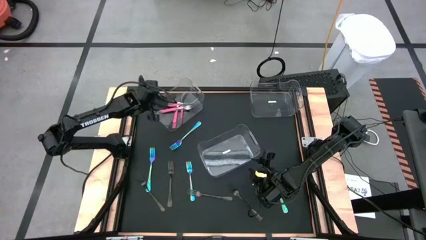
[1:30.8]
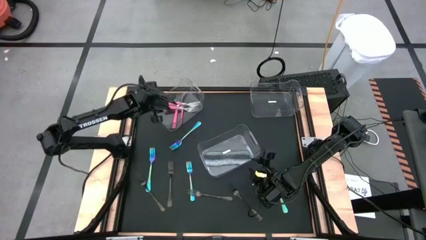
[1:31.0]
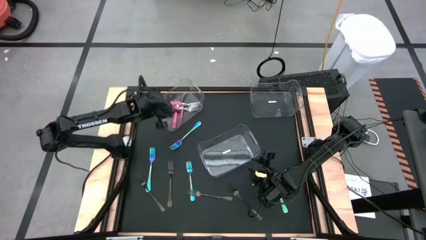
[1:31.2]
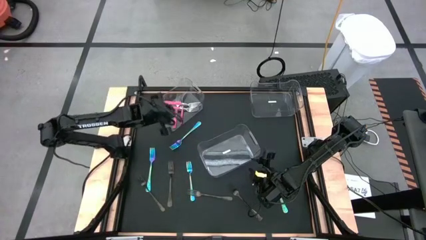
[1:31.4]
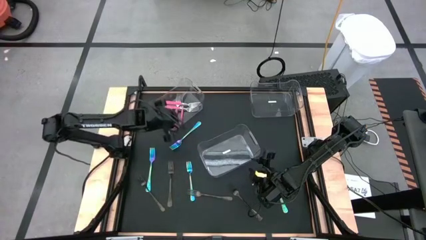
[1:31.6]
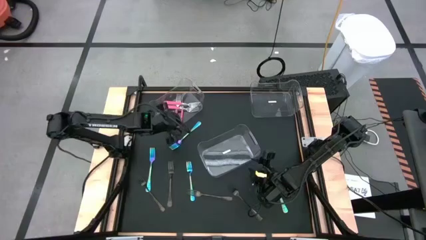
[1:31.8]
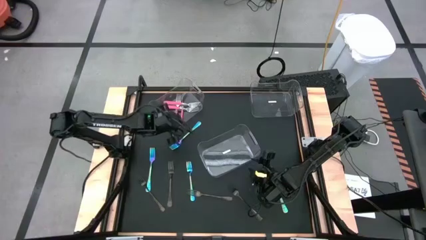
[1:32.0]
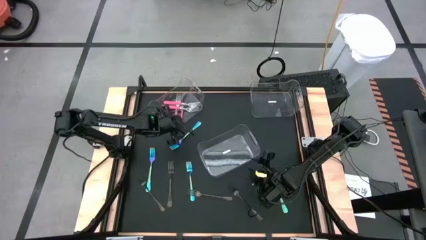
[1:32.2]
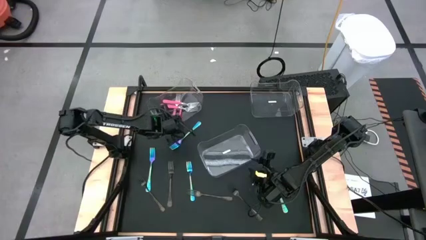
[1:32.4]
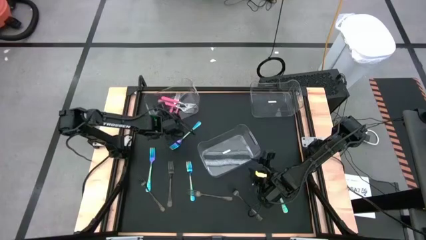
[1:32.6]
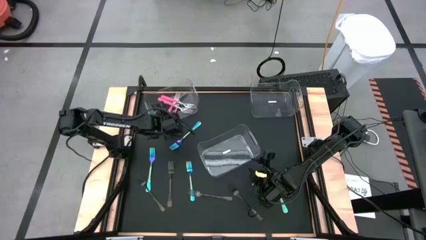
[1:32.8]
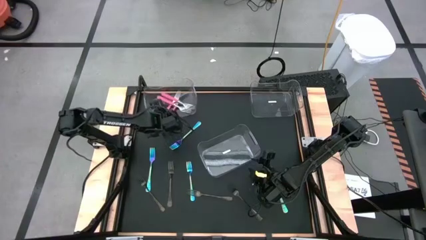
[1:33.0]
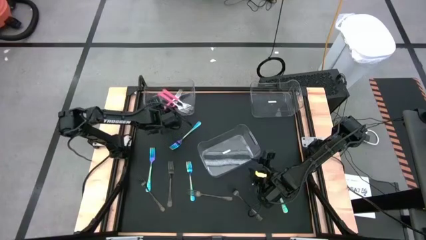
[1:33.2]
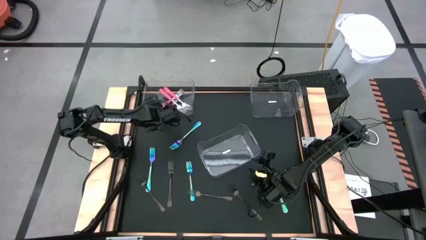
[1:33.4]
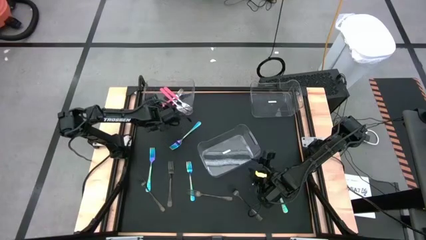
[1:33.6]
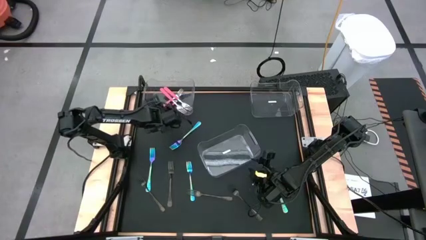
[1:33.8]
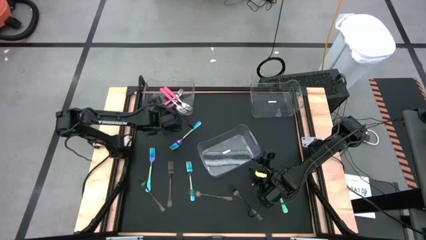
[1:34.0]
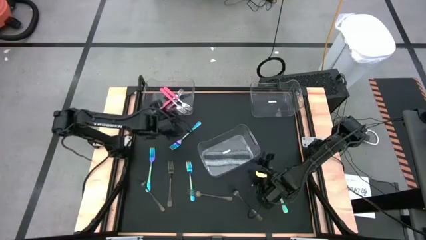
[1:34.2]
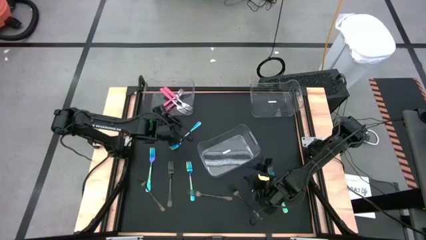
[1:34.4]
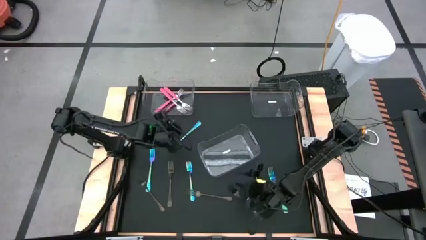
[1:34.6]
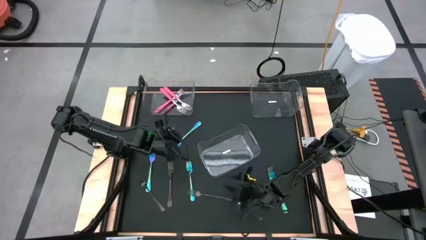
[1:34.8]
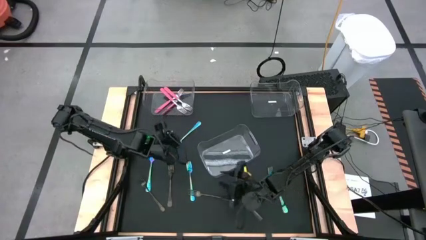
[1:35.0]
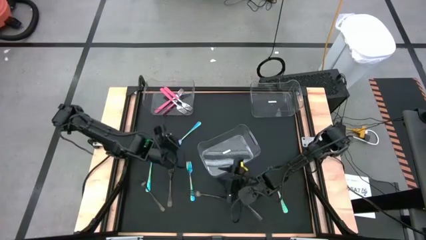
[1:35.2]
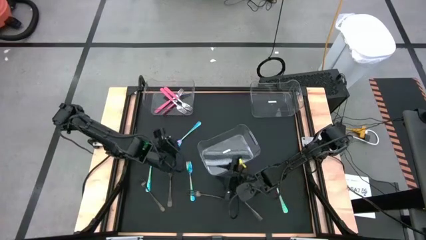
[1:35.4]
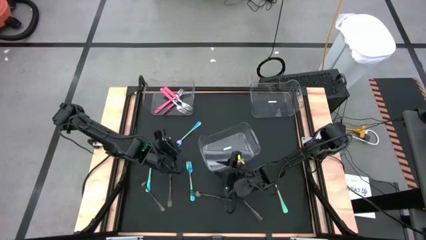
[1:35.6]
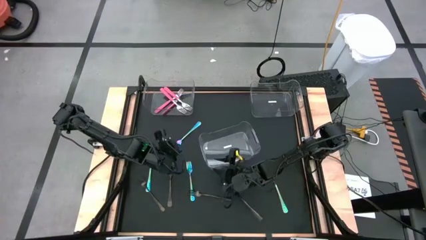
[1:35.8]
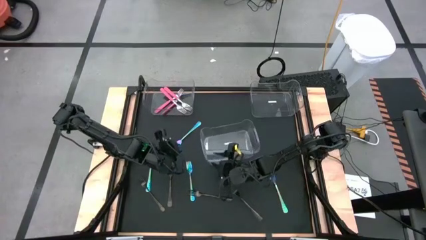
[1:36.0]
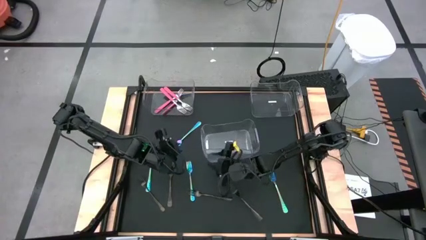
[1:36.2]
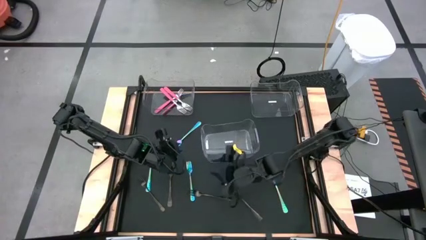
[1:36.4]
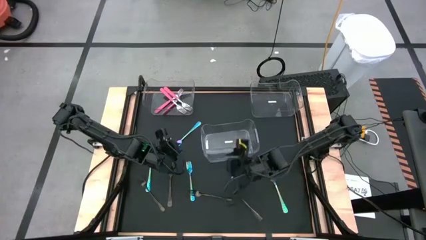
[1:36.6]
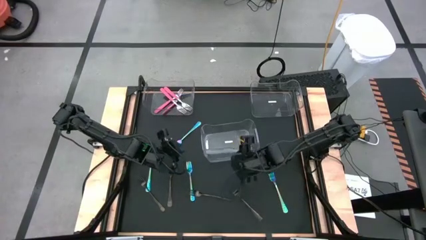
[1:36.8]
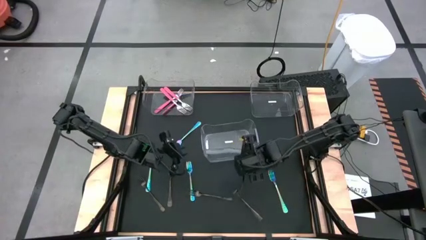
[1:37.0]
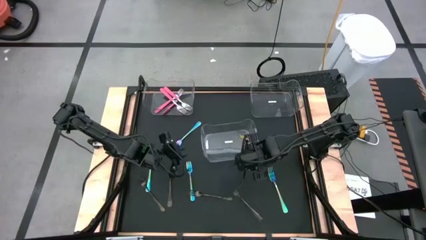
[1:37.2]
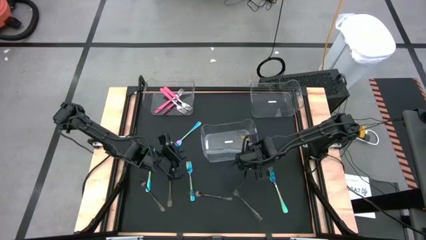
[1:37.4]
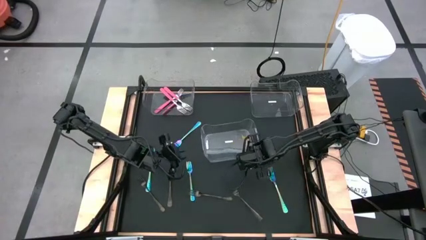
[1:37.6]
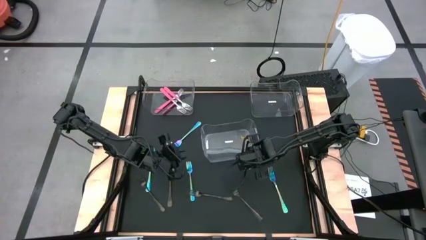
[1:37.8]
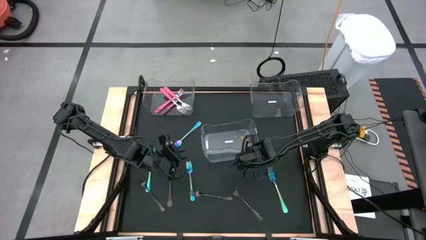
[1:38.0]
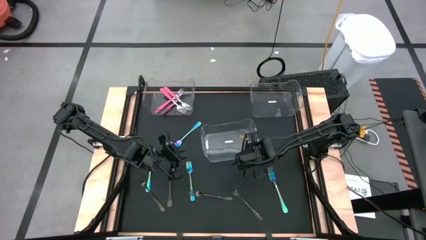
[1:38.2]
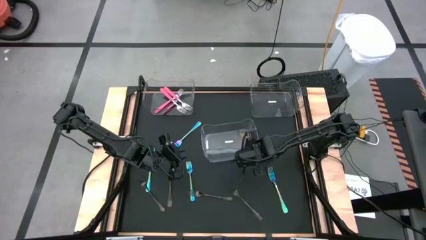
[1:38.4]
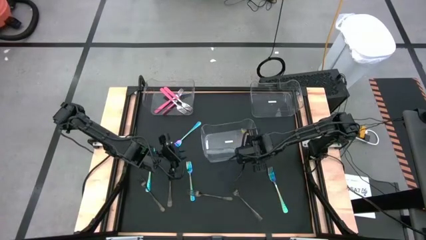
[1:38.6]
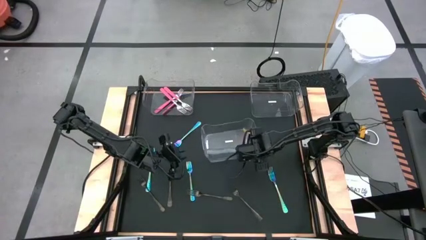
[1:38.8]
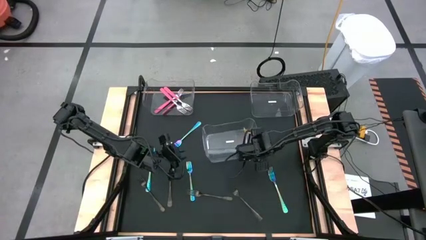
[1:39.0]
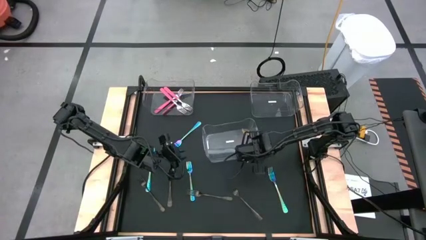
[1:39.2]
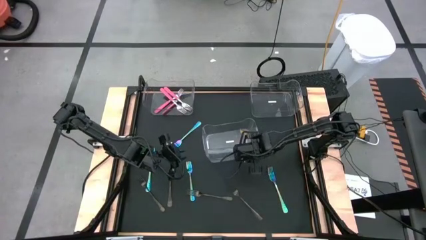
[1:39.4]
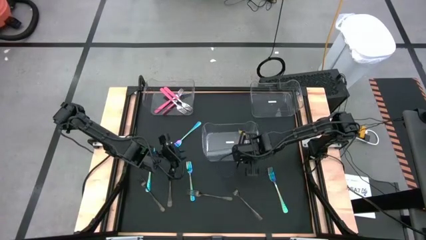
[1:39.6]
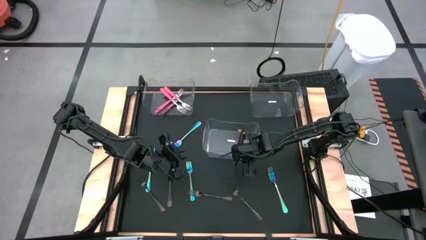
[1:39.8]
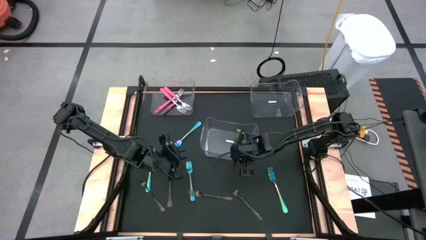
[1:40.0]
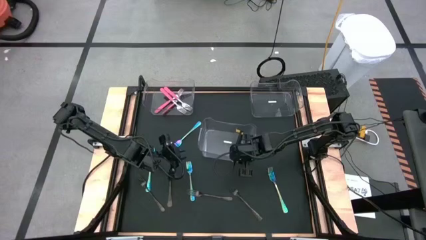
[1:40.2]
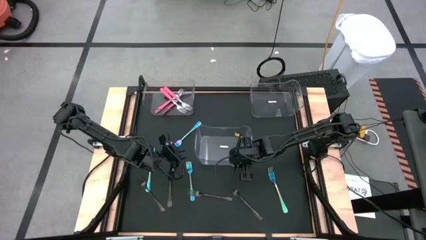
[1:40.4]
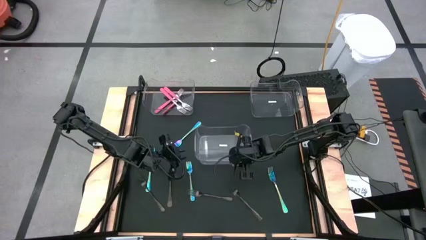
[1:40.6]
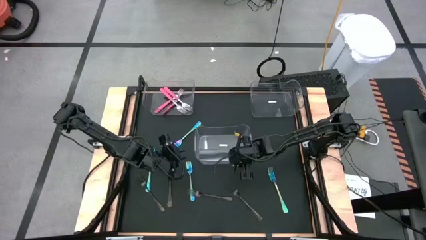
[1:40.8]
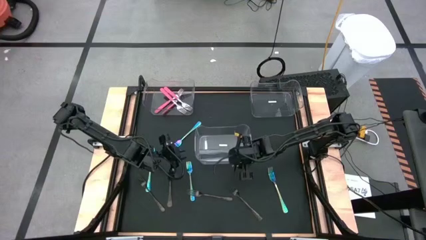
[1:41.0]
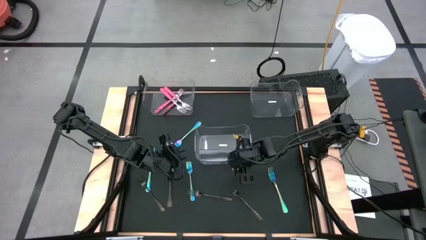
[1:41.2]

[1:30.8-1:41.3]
Task: Sort silverware by color (type)
Adjust the transparent bins

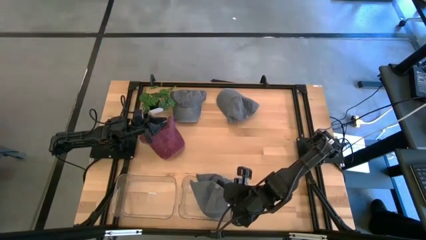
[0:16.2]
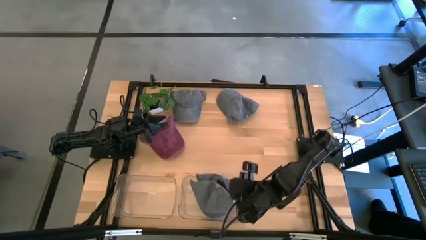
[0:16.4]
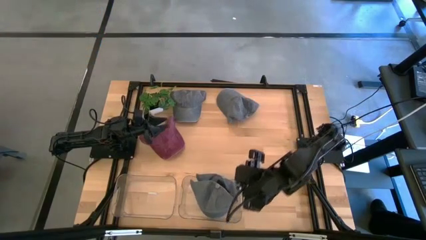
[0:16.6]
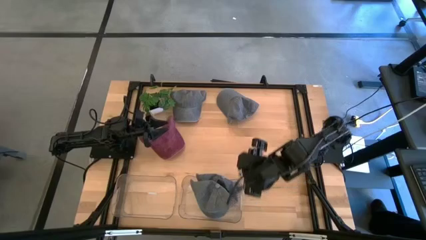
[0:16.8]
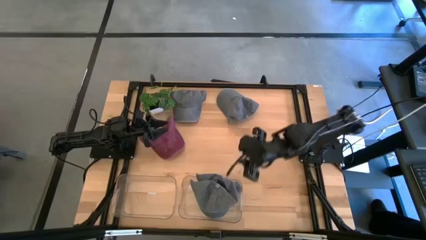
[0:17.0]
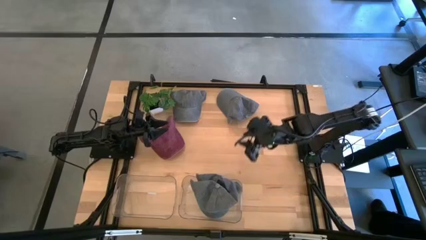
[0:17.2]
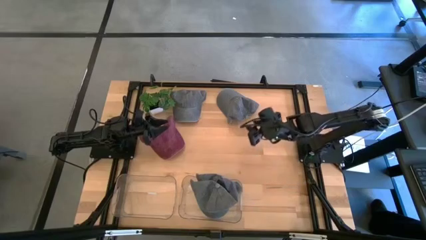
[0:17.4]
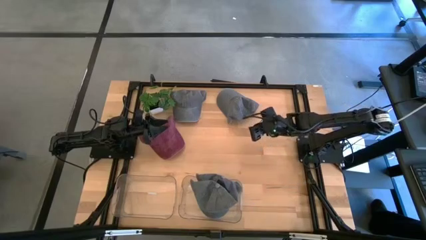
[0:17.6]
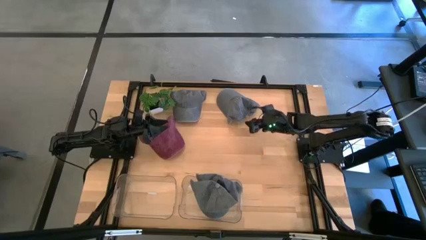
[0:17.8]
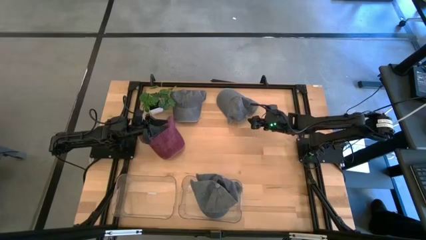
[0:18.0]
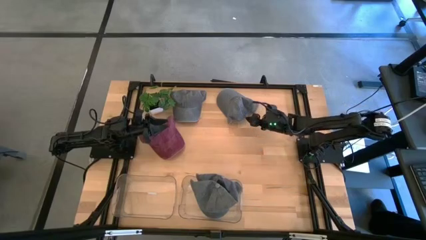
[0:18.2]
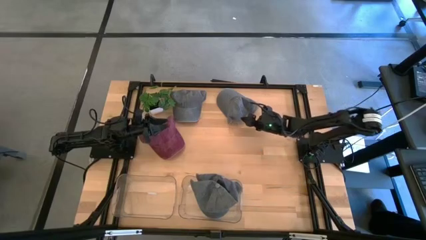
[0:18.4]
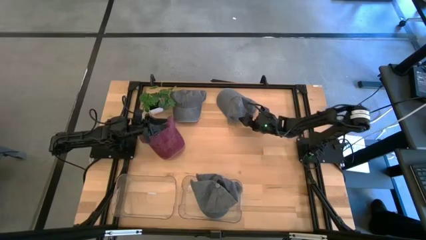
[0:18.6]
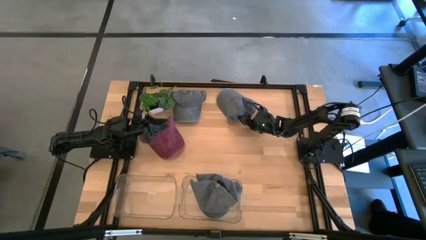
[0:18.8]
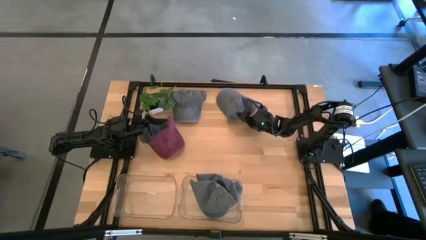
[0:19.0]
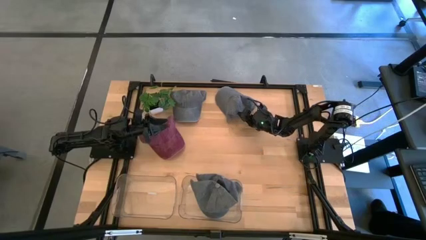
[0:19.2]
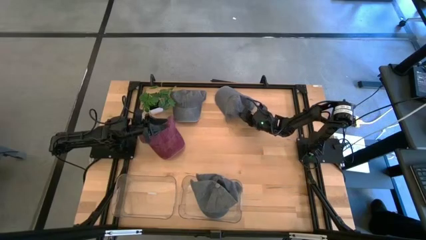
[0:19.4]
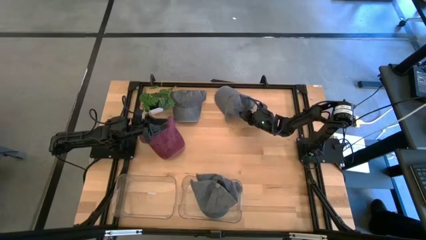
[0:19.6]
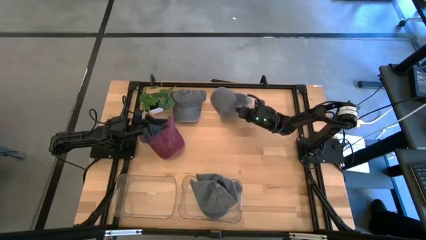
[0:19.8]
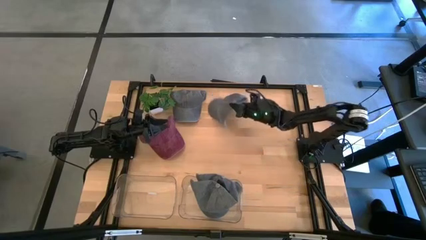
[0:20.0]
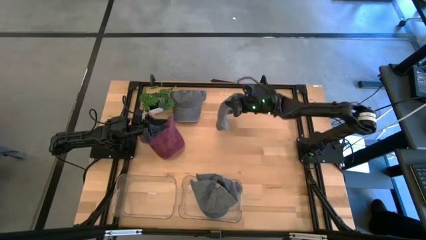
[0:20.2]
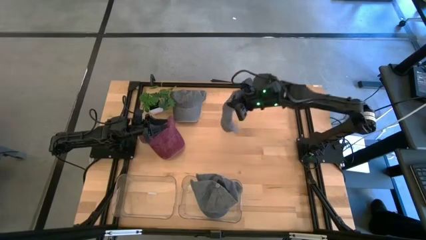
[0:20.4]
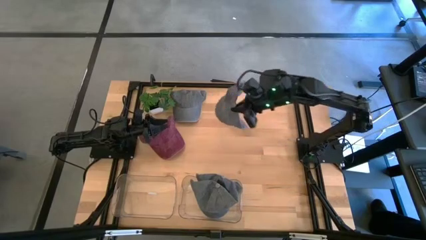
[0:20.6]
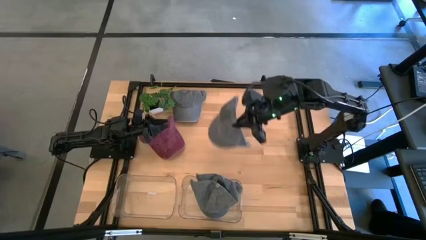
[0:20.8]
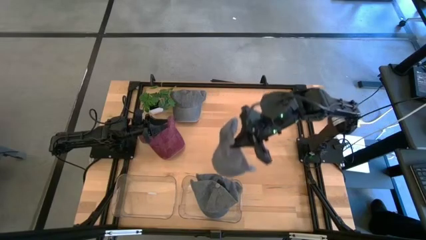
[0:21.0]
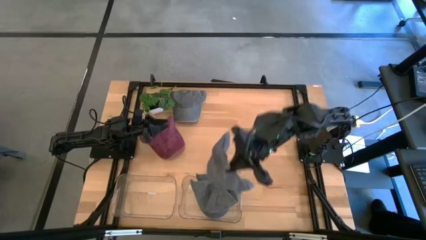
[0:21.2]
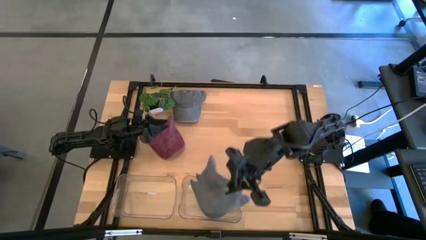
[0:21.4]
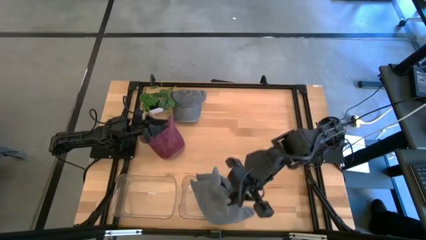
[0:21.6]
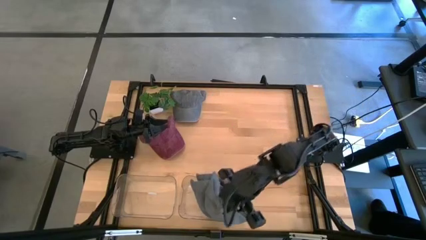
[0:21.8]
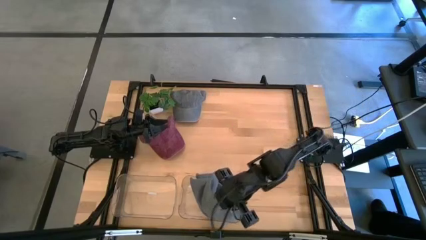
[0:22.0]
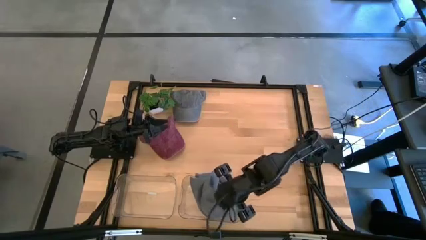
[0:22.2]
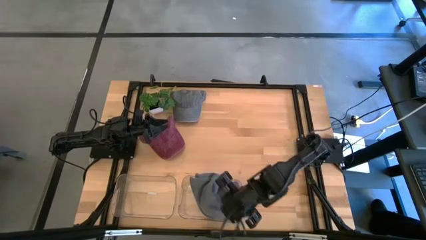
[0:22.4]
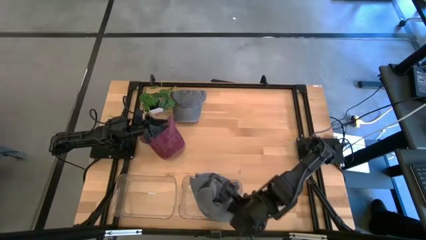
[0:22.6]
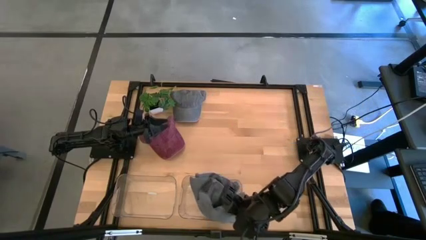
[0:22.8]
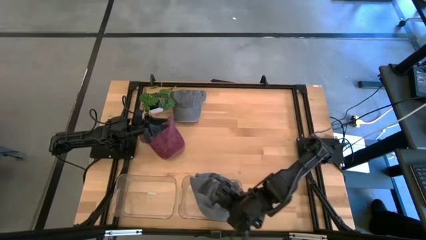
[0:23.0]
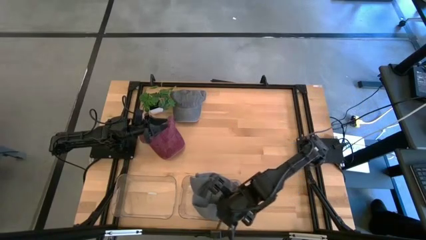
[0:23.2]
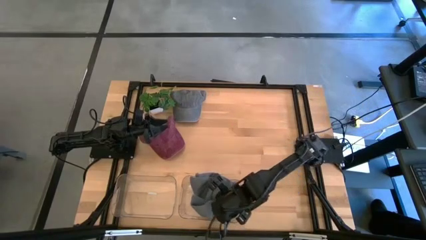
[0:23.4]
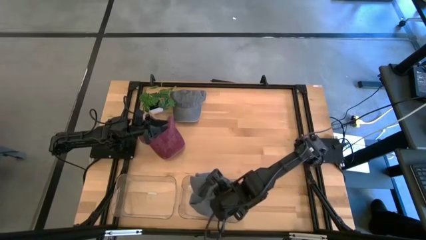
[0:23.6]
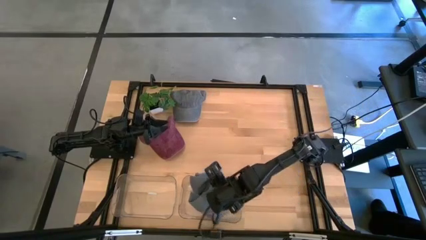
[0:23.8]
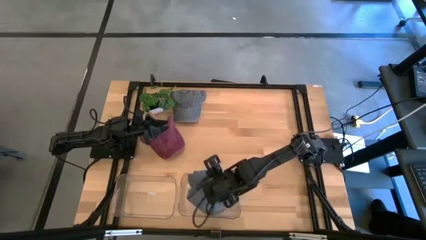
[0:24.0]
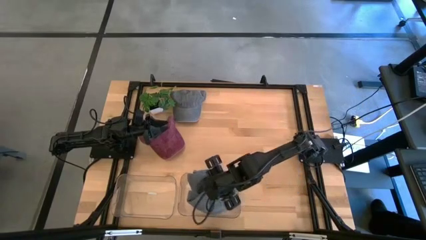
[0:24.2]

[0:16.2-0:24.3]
Task: Pick & Place hat
Put the grey cap into the right transparent bin
